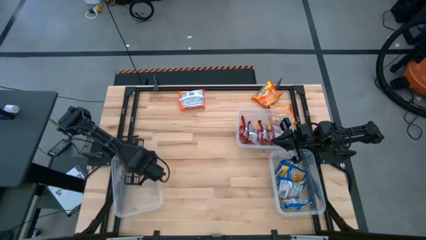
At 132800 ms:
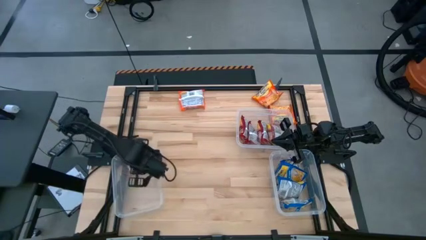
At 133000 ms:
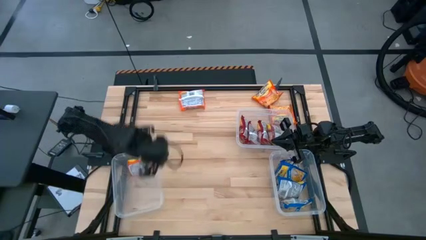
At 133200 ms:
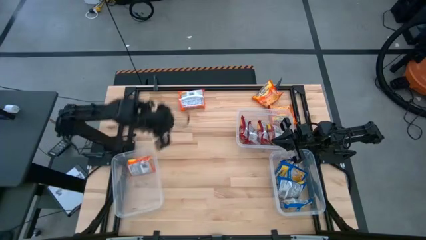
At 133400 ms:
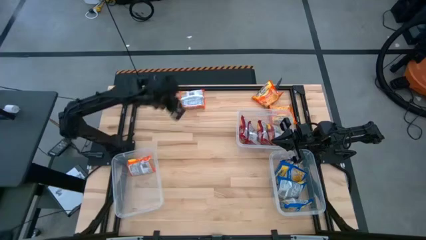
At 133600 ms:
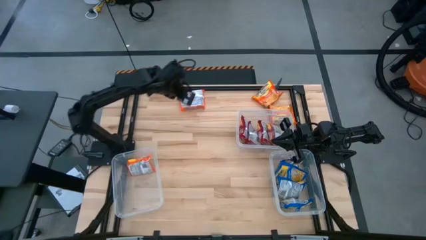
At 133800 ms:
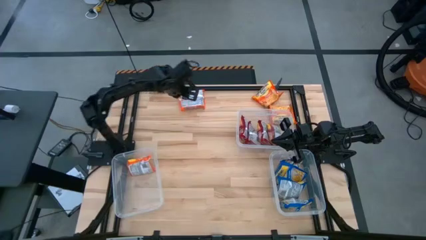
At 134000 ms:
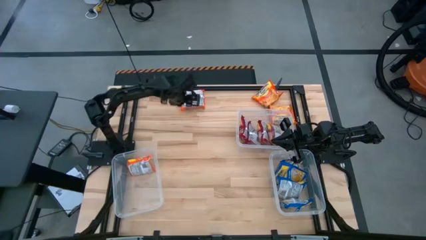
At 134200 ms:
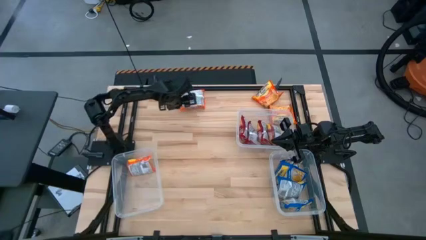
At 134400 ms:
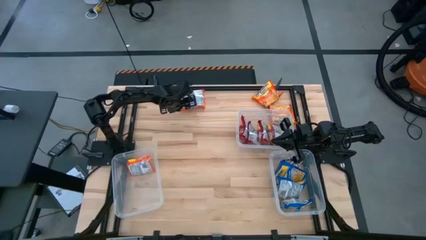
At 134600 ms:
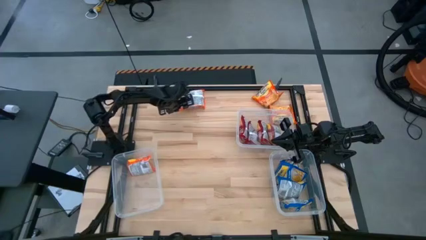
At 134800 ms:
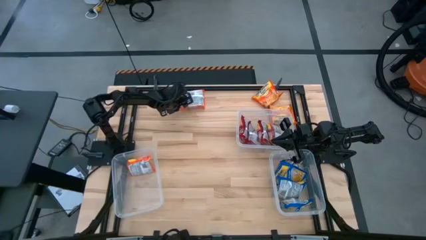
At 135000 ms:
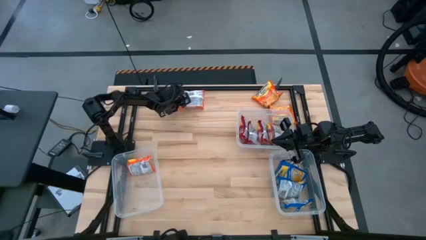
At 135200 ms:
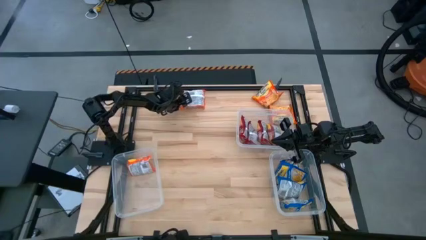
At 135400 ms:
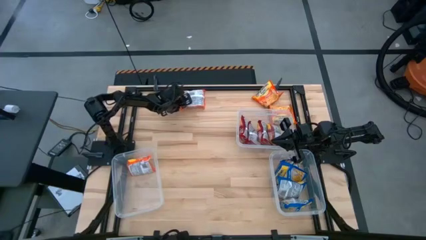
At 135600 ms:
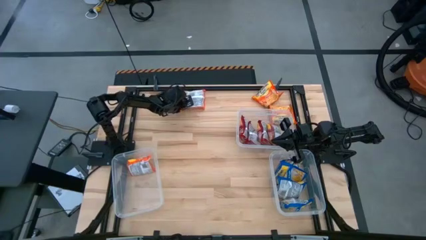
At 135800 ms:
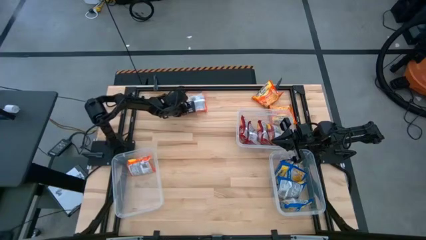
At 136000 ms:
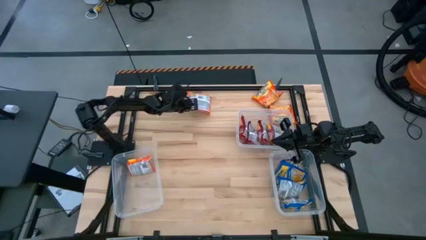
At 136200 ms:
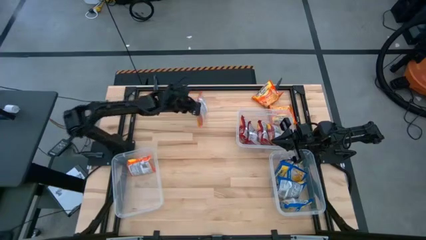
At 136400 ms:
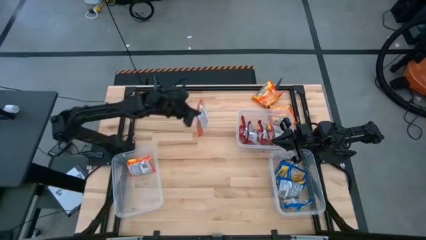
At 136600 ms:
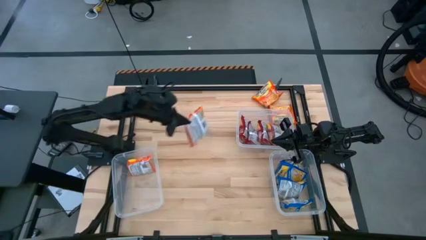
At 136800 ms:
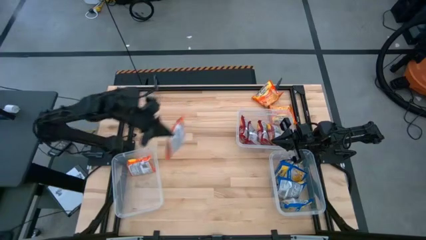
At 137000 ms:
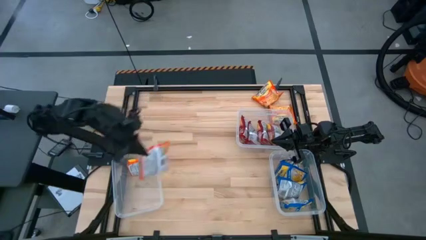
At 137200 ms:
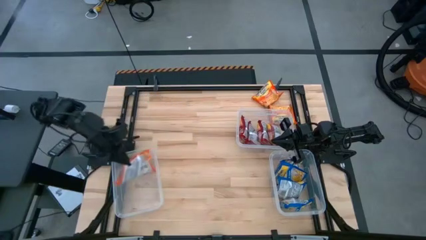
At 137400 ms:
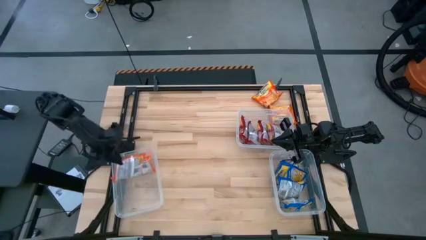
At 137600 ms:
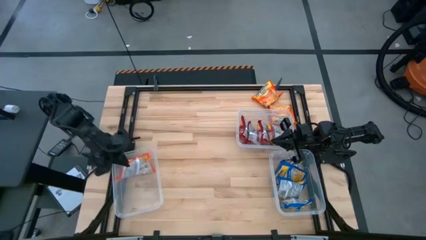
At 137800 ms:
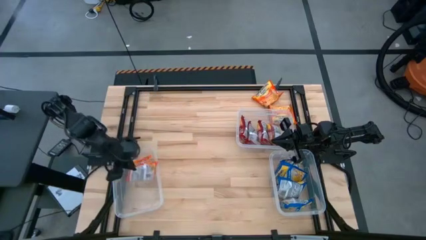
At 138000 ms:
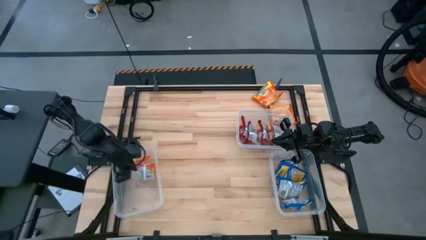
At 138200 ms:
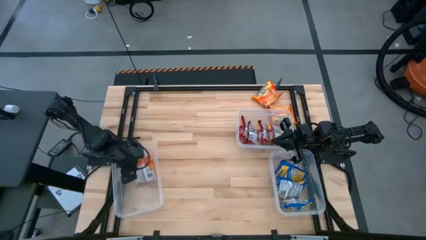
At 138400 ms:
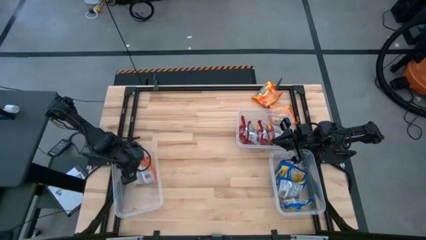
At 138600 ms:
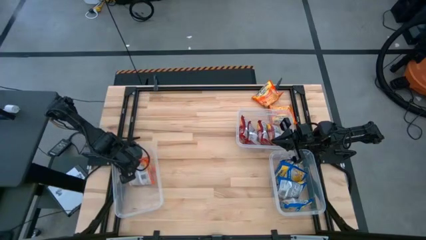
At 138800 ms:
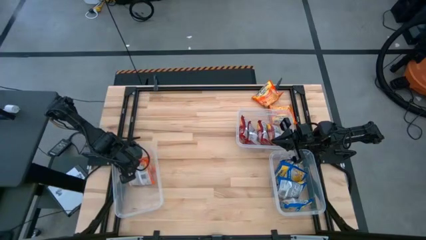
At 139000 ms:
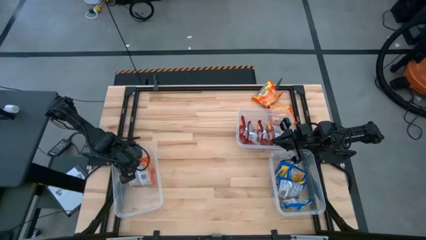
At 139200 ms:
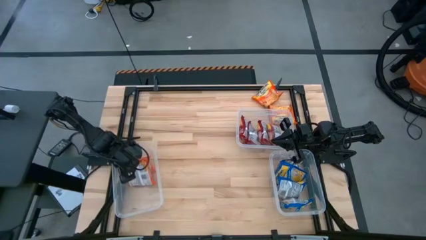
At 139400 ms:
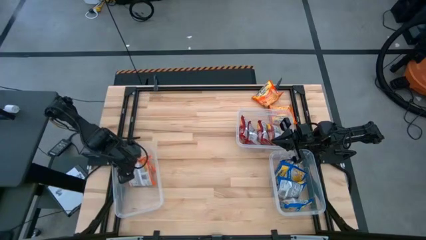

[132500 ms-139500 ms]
Task: Sort Maruchan noodles
Put the orange noodle pack into the left container

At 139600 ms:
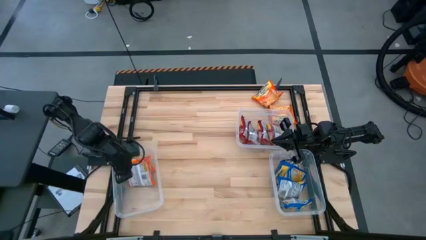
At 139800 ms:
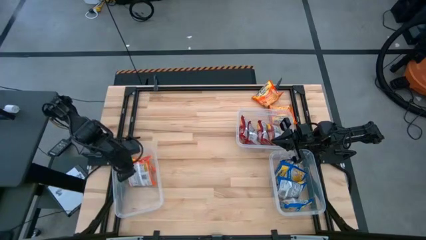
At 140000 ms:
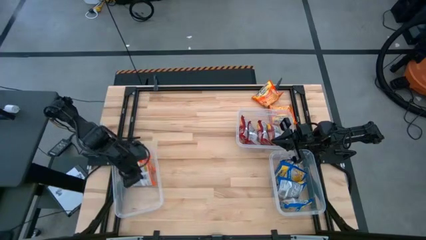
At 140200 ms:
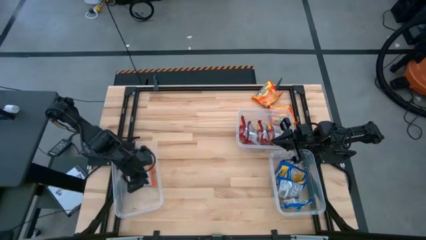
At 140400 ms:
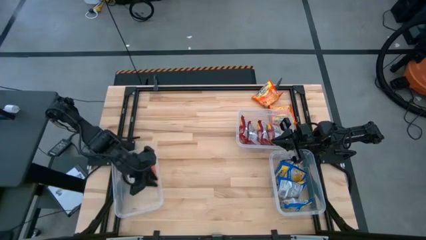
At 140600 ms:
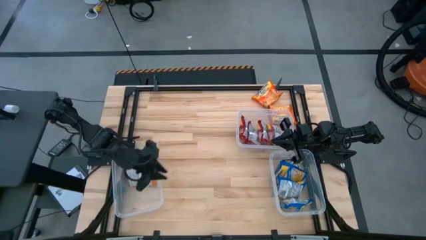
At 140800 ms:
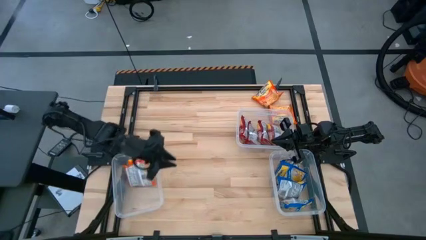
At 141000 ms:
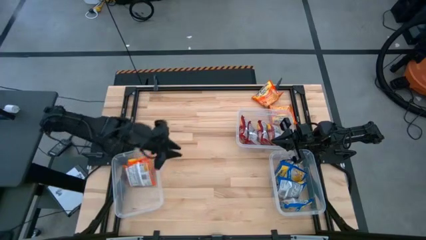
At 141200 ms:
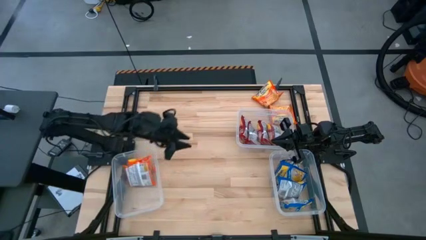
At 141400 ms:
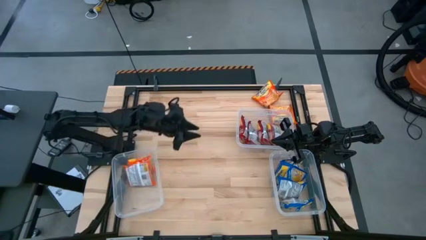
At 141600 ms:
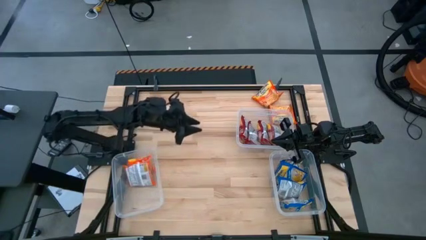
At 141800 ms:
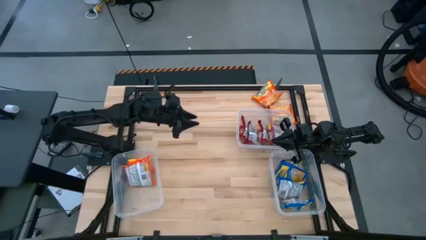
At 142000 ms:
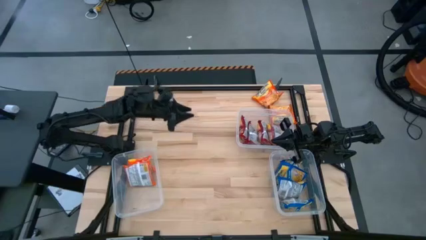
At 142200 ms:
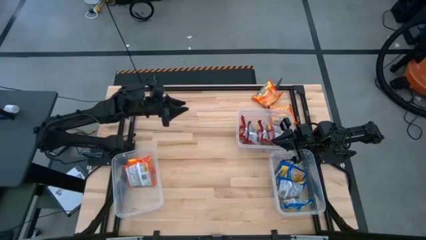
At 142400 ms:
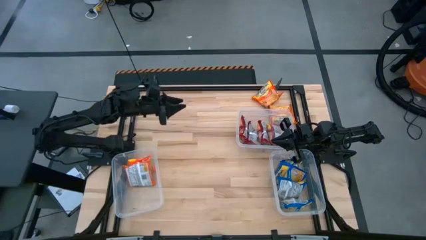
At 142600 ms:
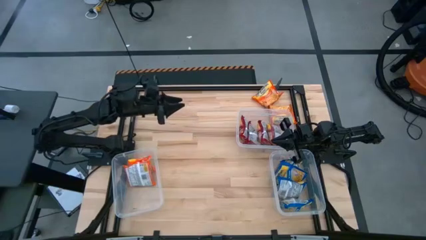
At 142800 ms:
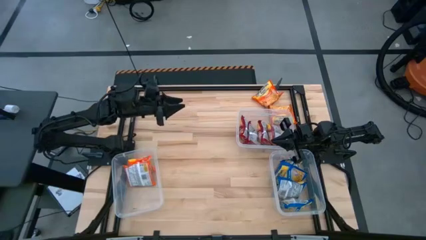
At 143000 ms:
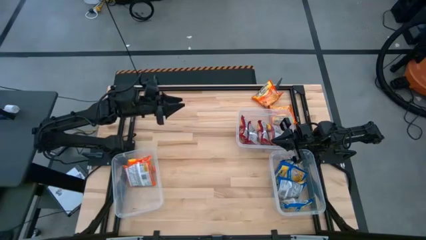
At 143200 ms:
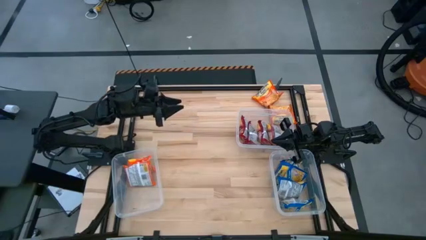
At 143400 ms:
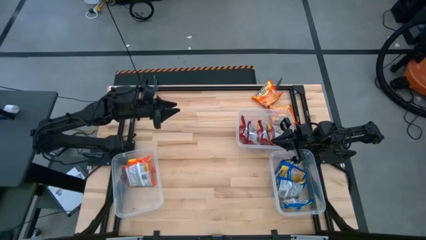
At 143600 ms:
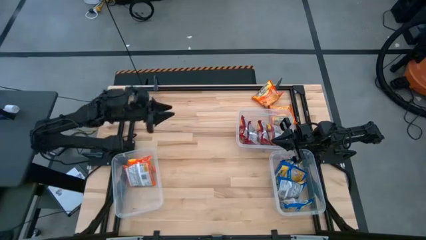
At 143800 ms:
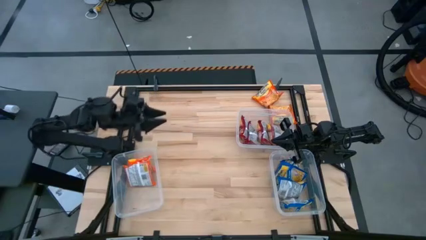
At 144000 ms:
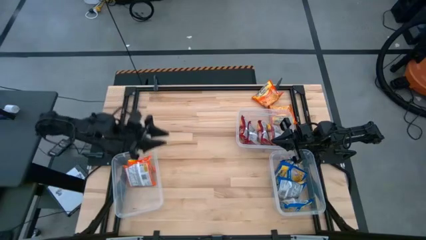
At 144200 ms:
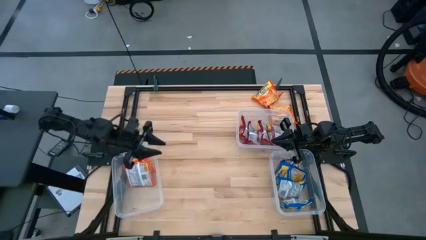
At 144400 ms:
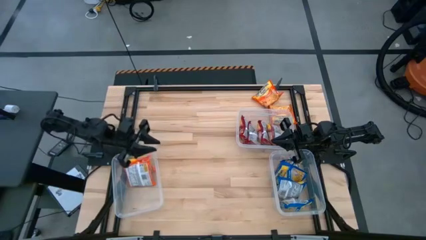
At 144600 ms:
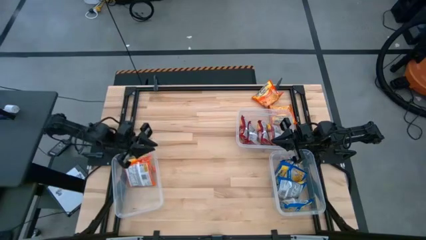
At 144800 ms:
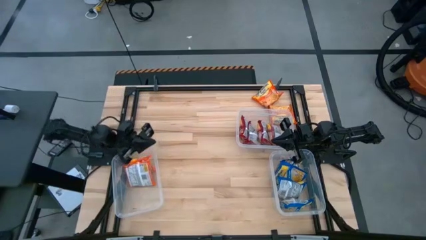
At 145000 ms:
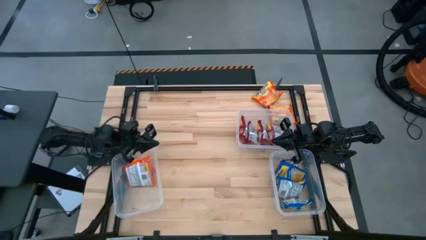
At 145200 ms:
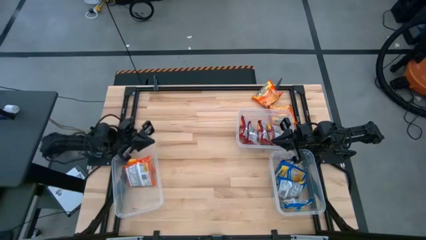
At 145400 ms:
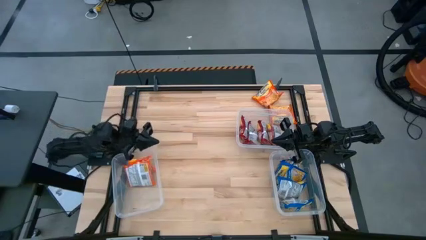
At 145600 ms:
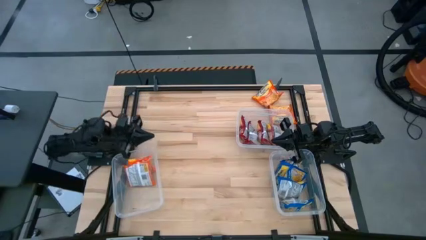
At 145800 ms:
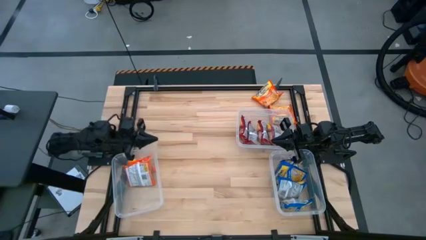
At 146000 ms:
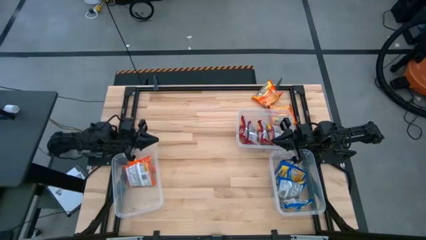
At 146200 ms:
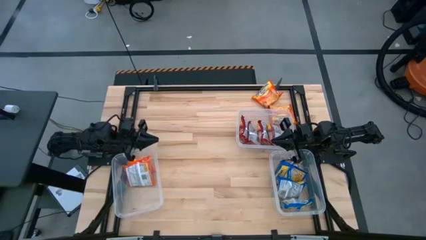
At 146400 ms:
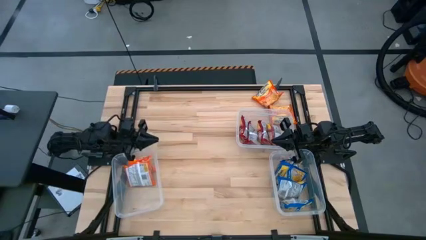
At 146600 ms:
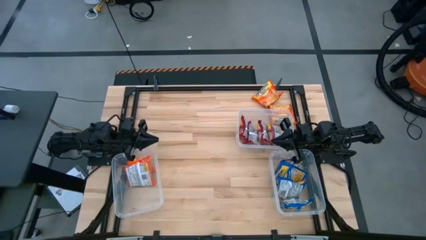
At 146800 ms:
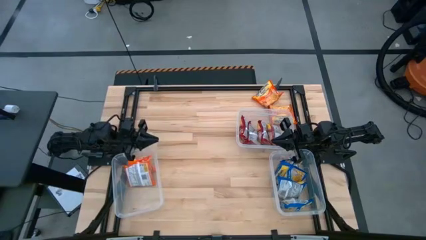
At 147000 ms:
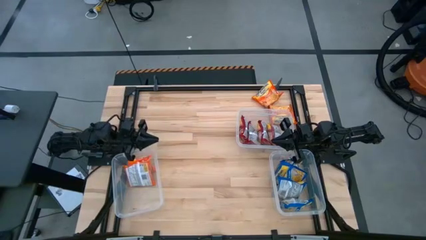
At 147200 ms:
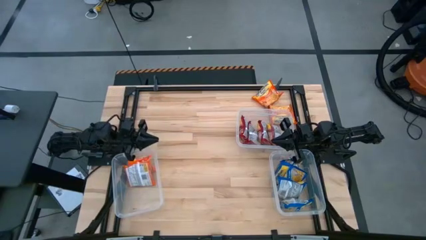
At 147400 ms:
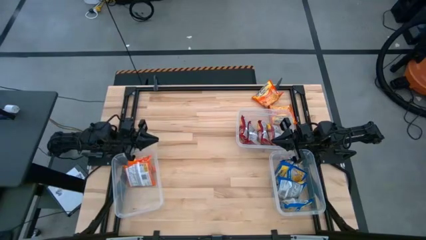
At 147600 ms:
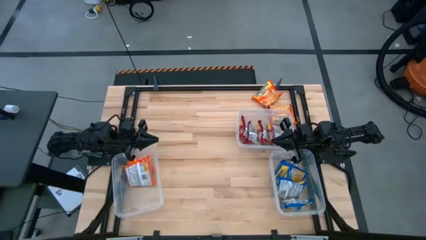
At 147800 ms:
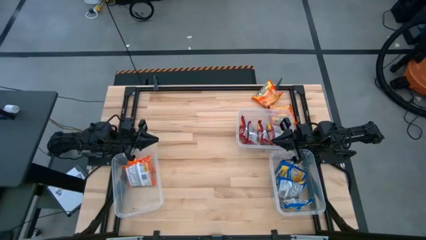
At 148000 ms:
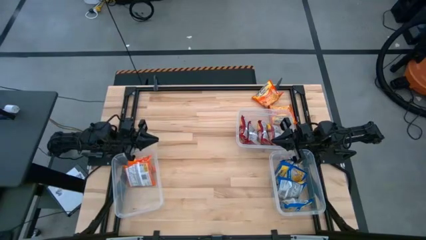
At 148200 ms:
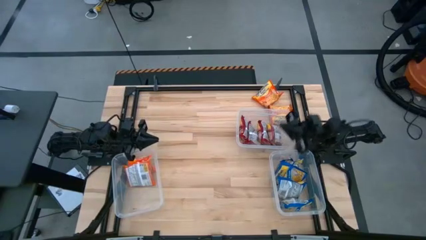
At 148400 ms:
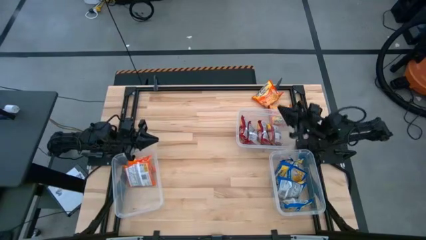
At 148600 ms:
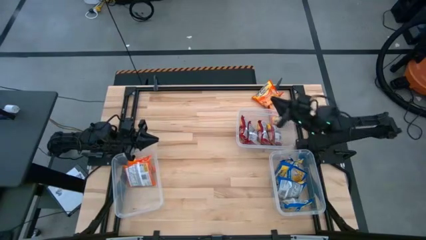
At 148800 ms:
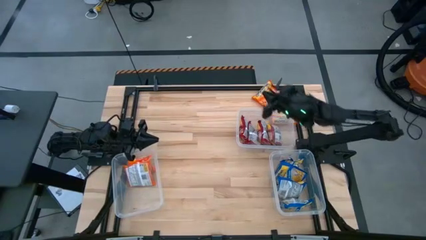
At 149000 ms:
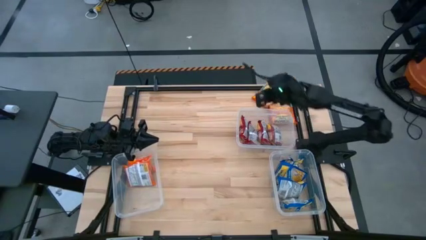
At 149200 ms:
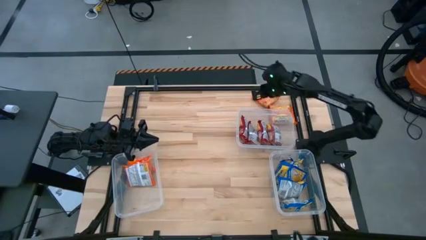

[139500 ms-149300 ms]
Put the orange noodle pack into the left container
